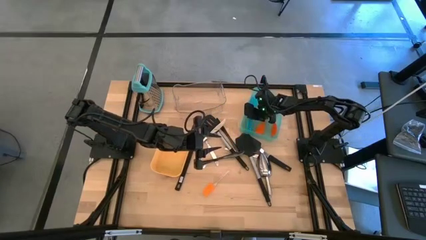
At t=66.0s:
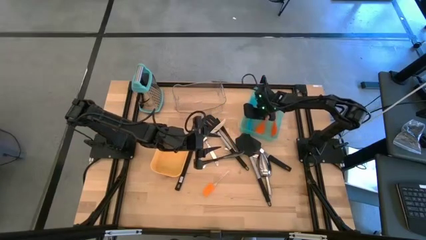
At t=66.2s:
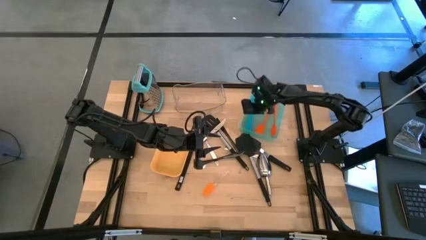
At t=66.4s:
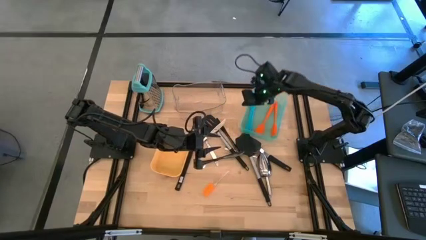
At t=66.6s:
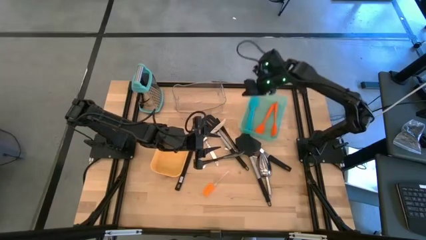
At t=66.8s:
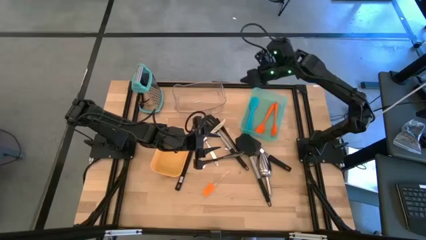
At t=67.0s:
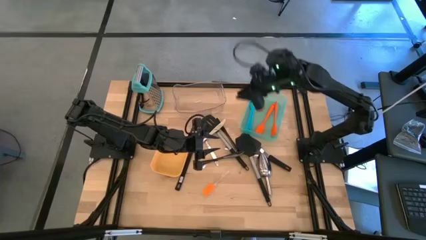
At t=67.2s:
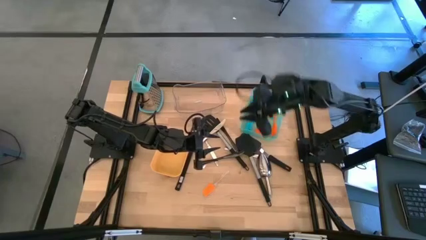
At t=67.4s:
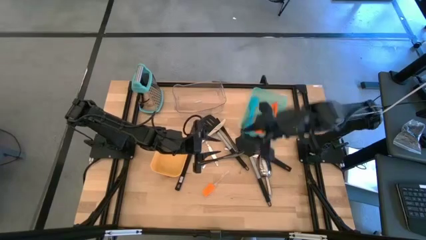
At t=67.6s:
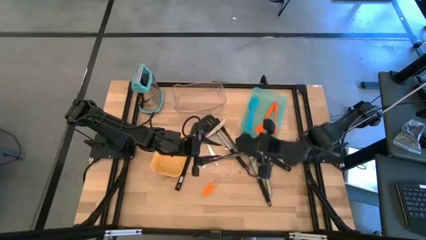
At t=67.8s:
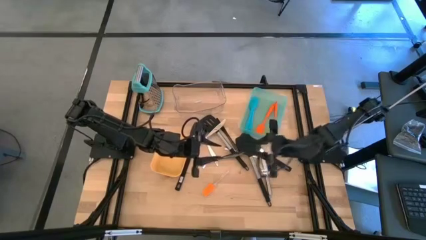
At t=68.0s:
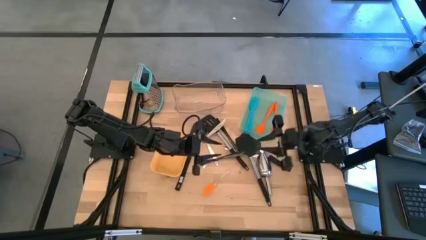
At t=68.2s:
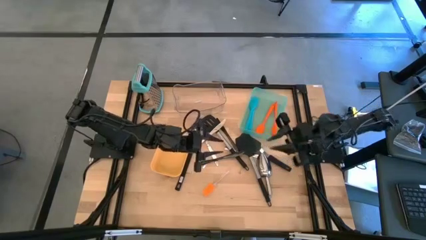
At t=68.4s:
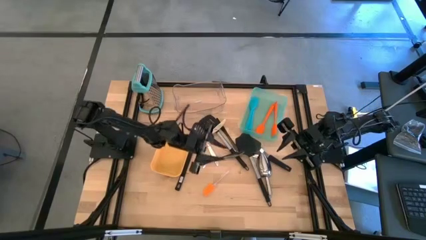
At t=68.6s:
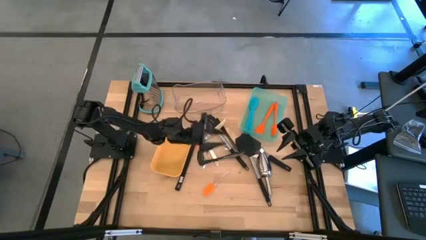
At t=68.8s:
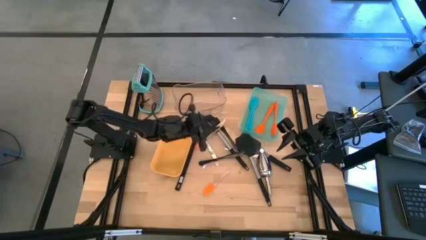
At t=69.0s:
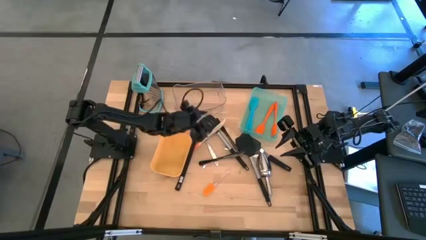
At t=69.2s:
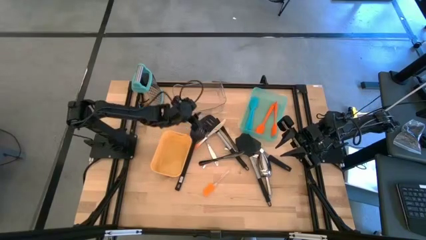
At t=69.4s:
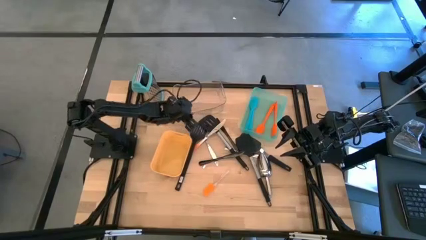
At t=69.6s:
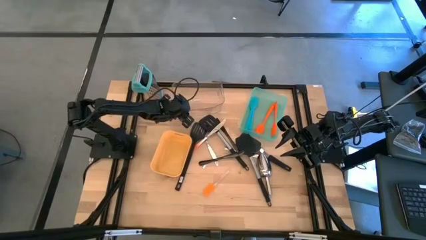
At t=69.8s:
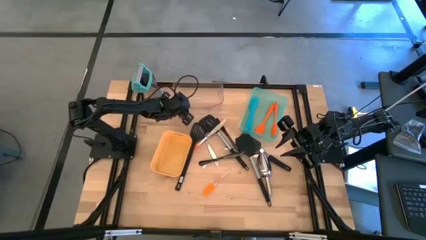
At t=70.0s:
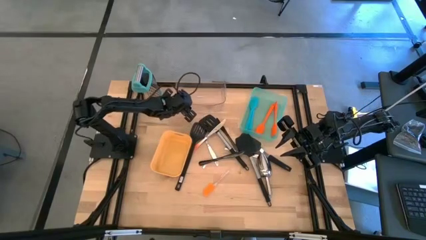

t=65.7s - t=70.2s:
Task: Pick & Place Kitchen Items
Adjust the bins

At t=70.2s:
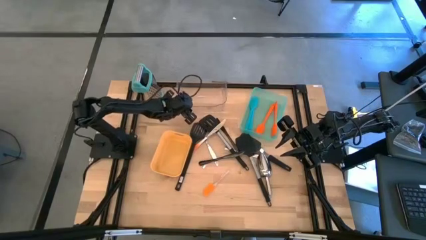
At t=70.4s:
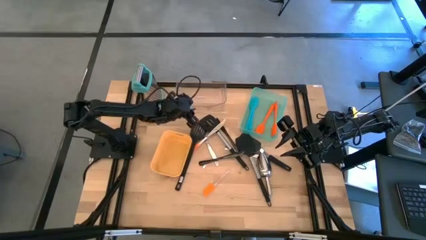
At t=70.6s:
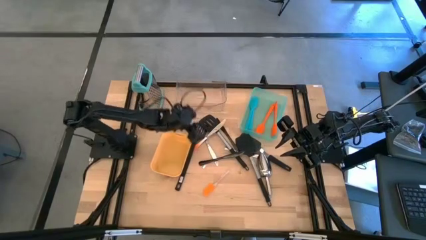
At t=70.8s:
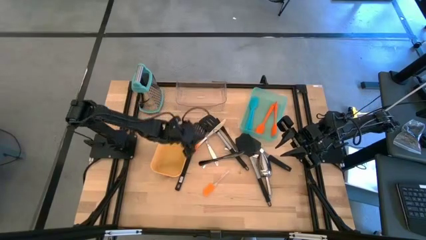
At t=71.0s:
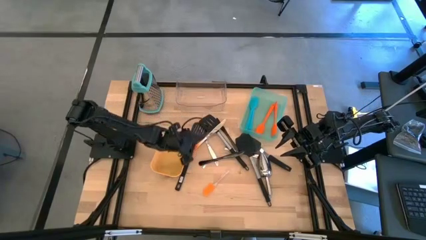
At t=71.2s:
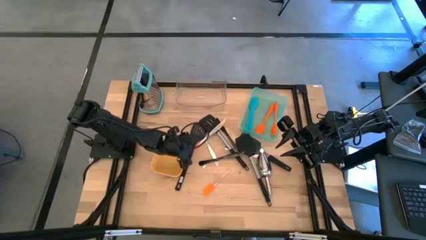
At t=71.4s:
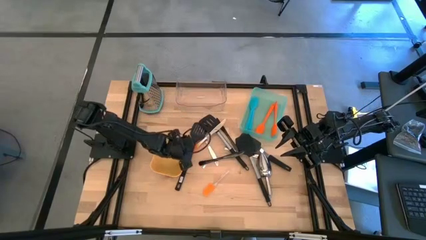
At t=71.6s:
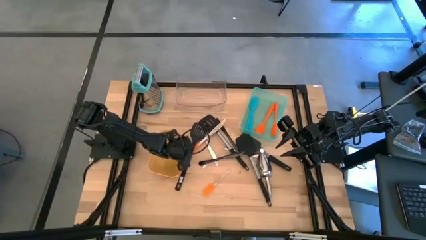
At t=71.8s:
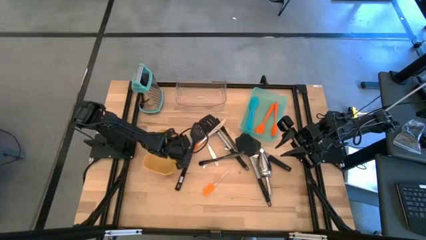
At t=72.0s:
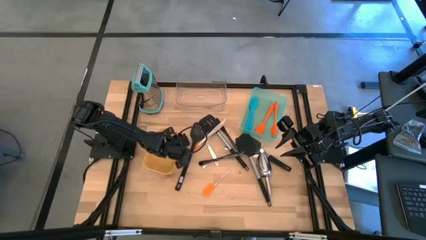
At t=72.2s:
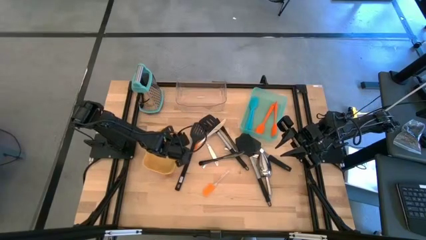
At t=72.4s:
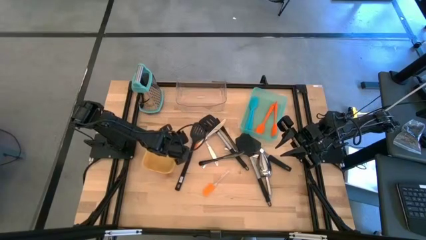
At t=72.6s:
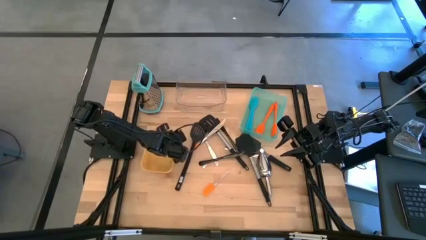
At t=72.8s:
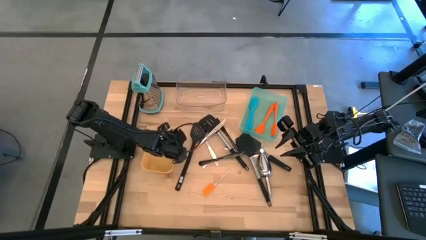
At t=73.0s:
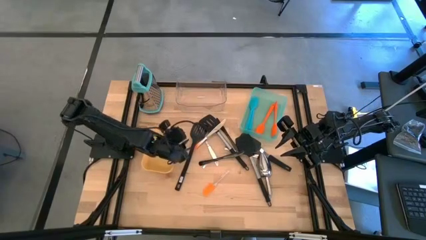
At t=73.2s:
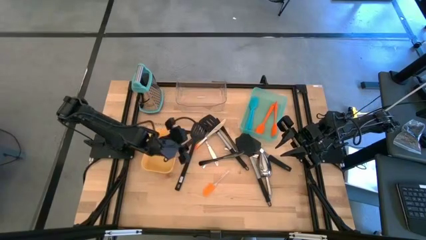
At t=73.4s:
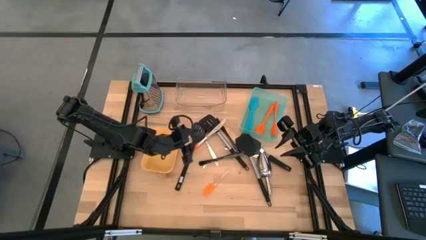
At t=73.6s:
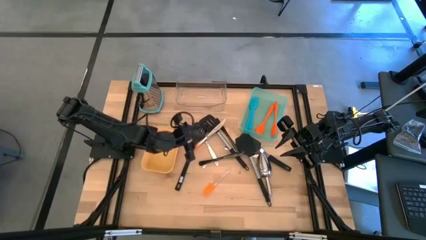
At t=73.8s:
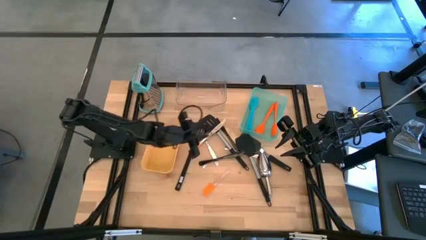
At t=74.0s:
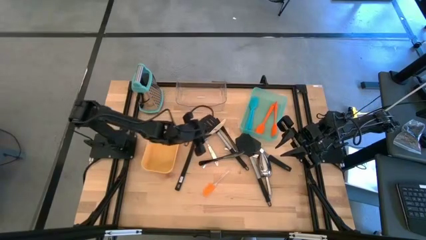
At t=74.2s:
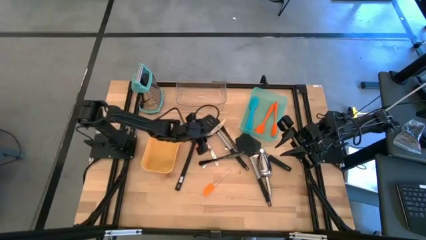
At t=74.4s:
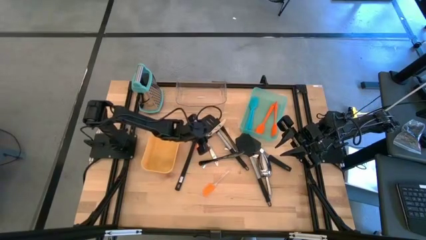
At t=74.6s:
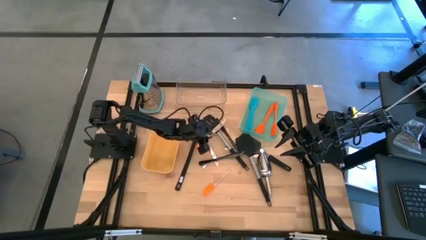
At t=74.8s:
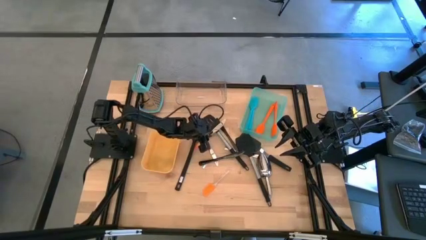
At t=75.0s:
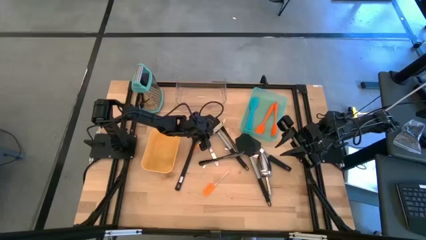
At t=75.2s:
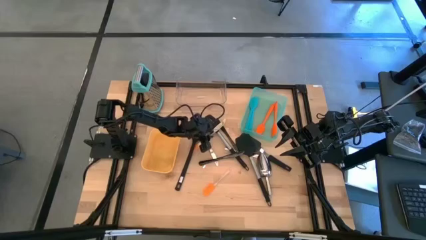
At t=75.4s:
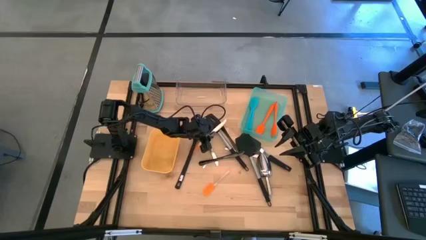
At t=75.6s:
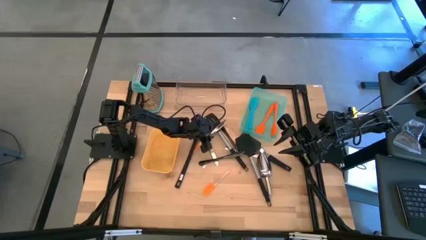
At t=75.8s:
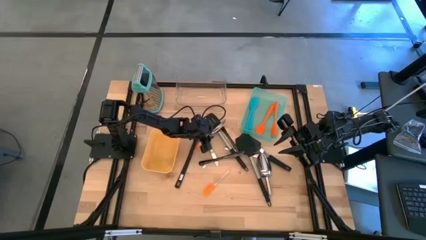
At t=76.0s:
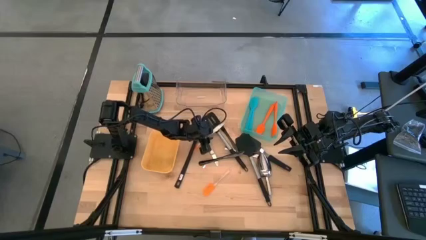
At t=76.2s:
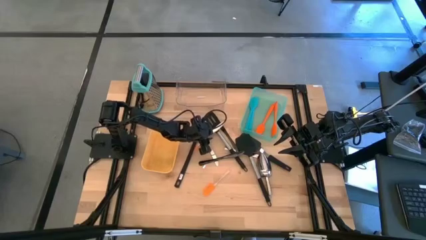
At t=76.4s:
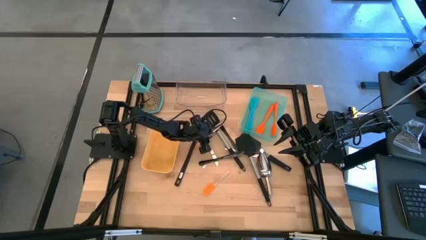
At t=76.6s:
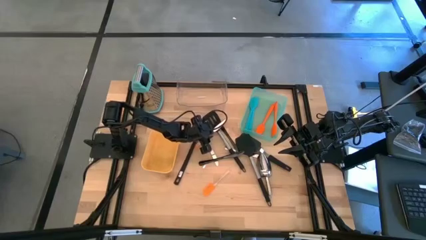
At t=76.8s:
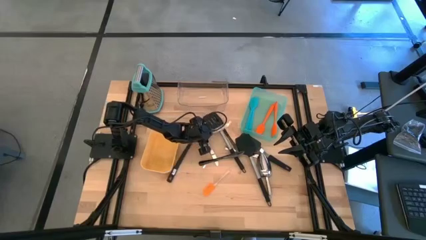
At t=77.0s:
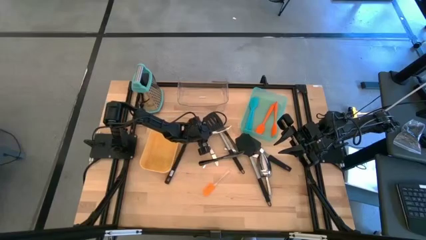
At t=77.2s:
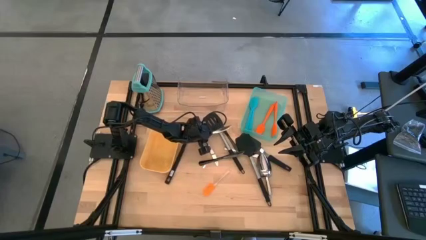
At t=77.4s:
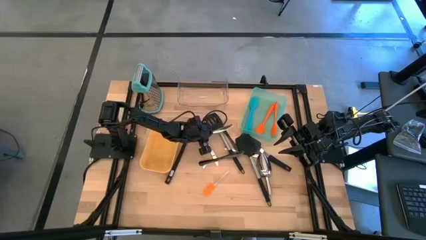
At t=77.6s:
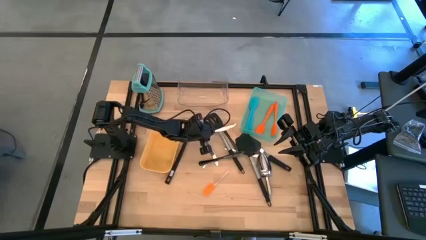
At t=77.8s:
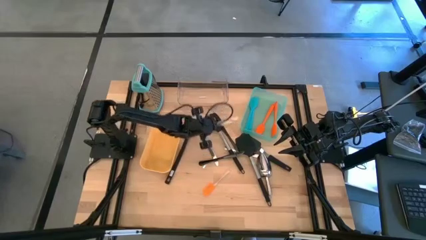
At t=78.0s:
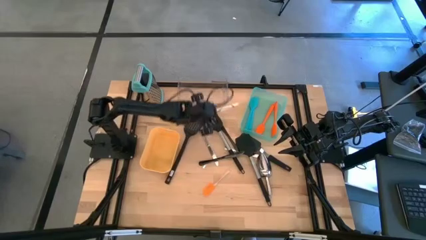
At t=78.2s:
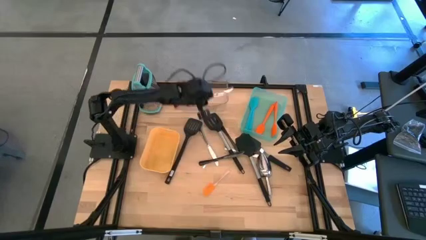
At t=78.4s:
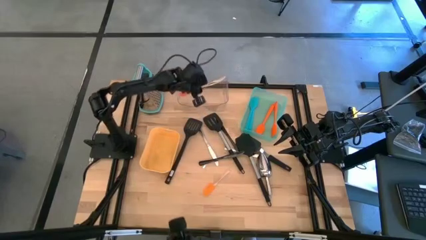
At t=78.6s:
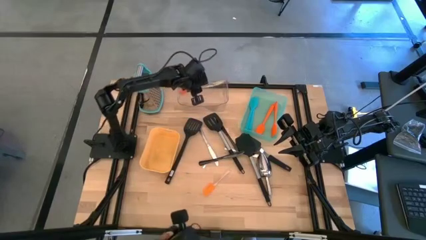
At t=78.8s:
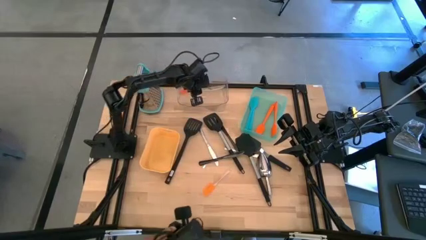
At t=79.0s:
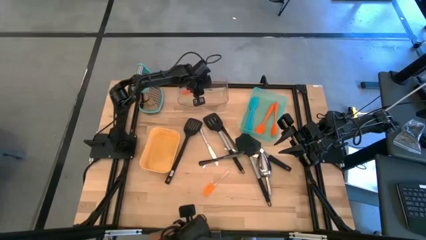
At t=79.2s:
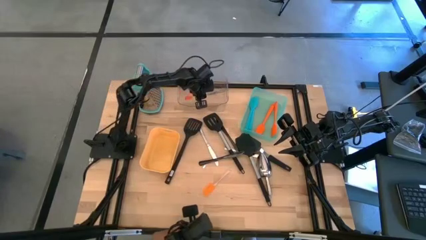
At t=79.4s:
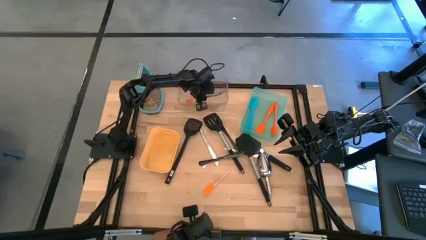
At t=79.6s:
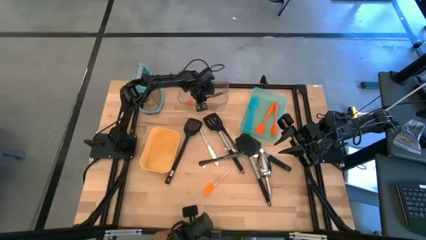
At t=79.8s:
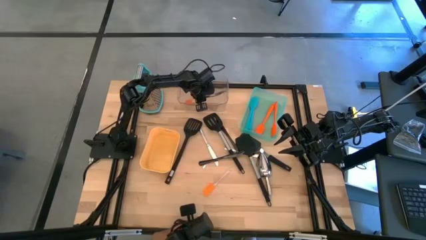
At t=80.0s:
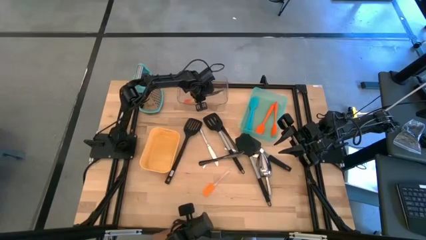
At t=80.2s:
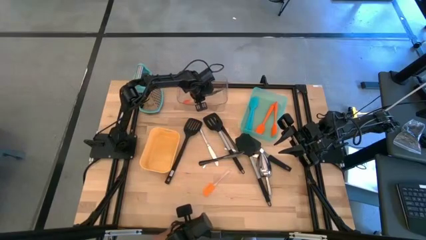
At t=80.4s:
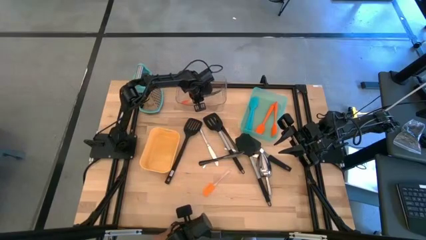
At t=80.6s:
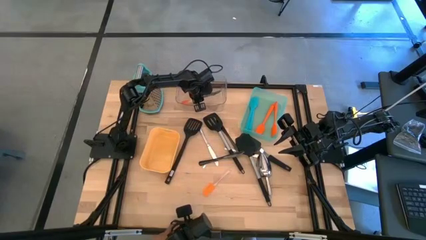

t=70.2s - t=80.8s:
Put the orange table knife into the transparent bin
